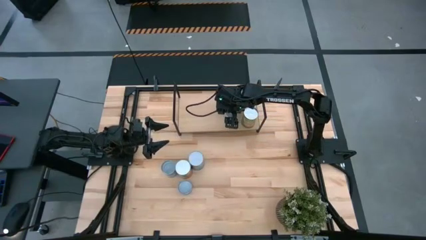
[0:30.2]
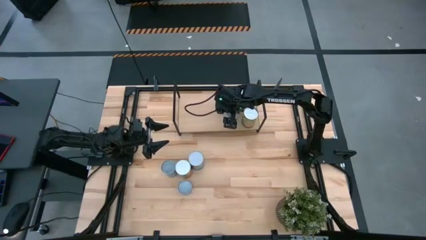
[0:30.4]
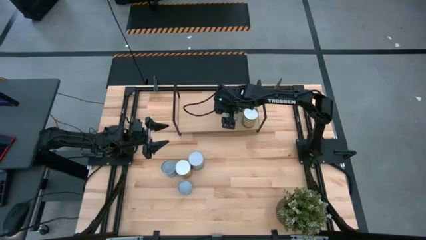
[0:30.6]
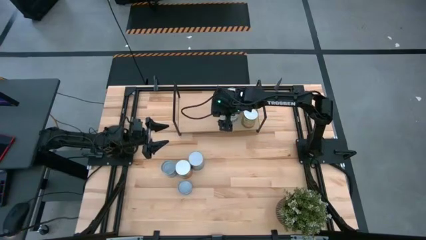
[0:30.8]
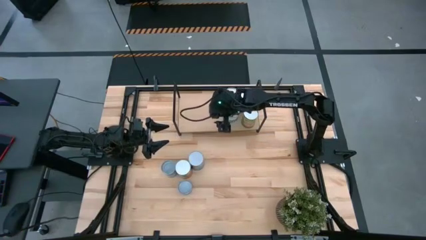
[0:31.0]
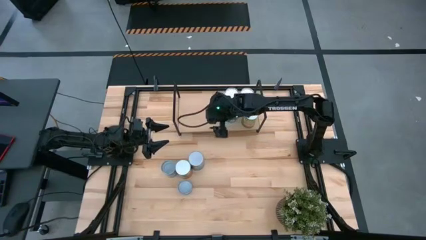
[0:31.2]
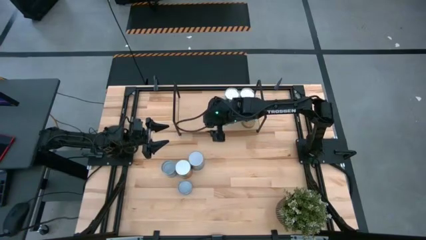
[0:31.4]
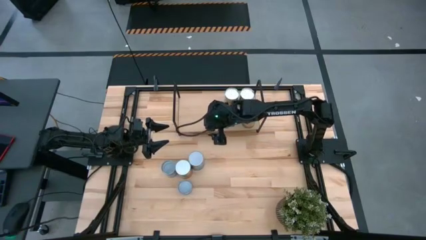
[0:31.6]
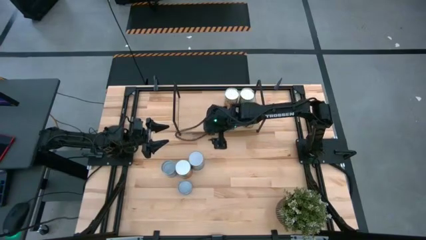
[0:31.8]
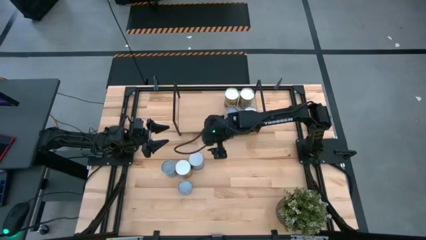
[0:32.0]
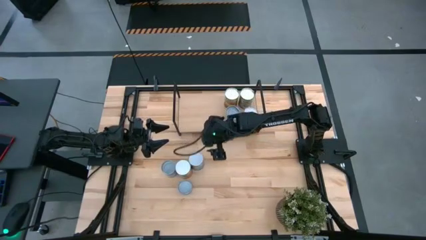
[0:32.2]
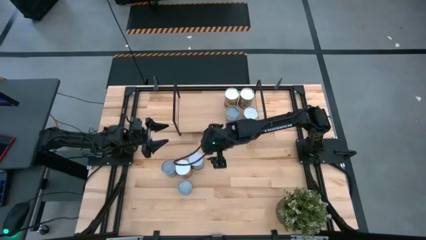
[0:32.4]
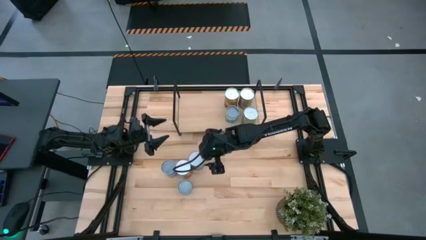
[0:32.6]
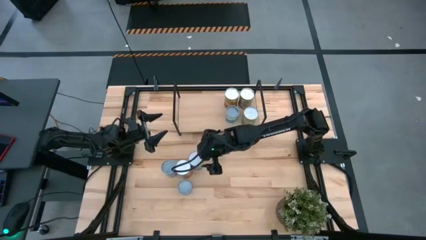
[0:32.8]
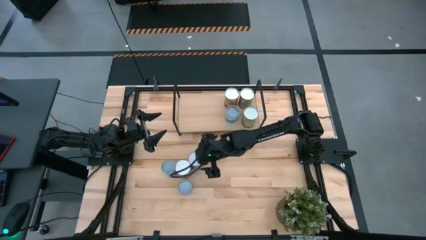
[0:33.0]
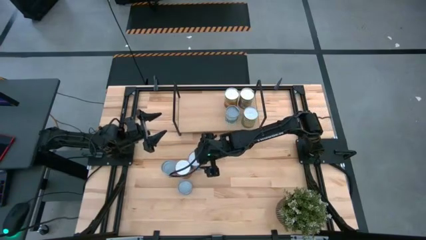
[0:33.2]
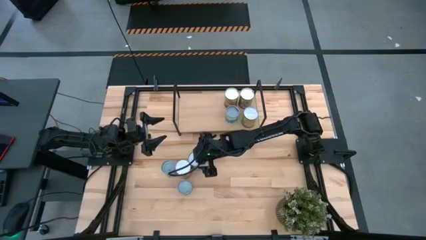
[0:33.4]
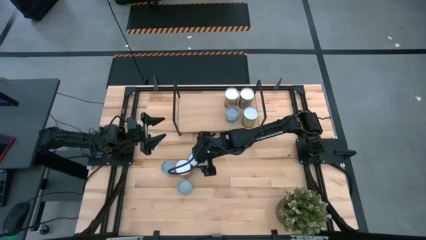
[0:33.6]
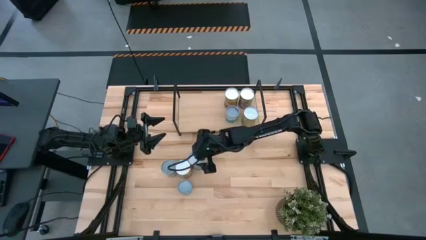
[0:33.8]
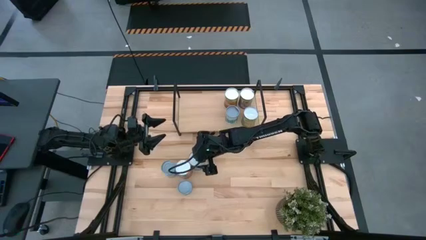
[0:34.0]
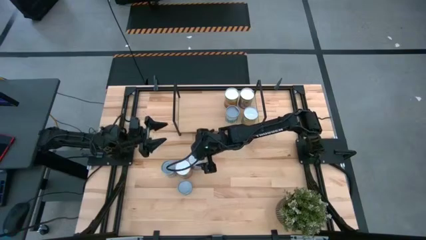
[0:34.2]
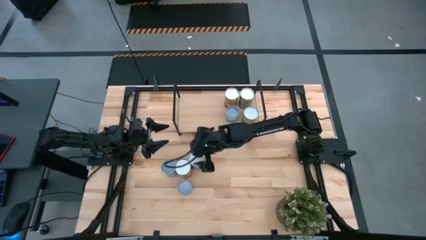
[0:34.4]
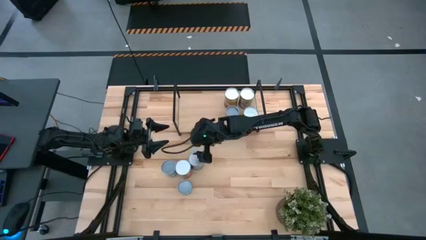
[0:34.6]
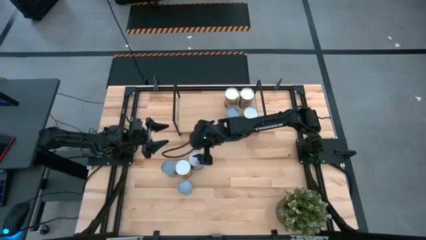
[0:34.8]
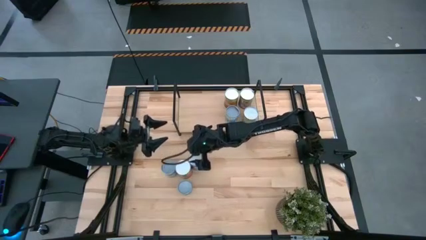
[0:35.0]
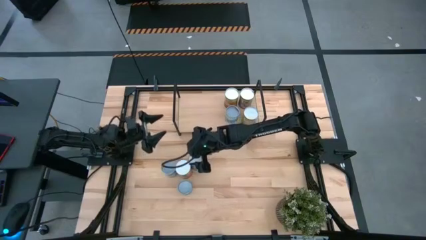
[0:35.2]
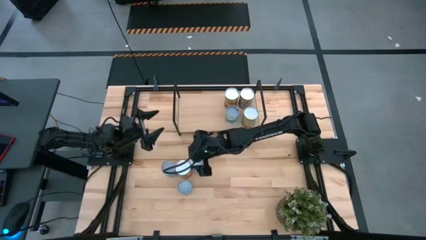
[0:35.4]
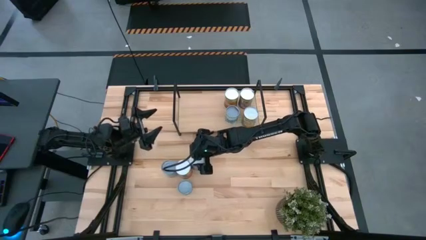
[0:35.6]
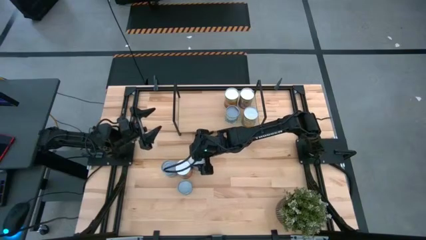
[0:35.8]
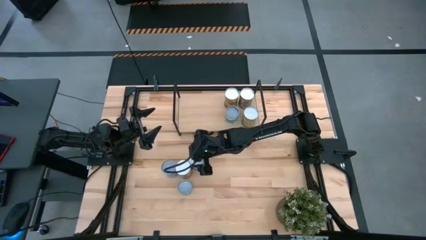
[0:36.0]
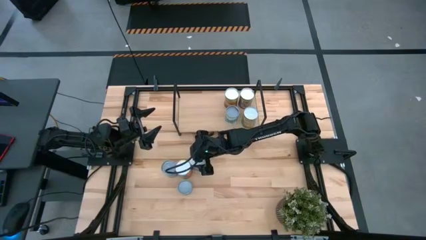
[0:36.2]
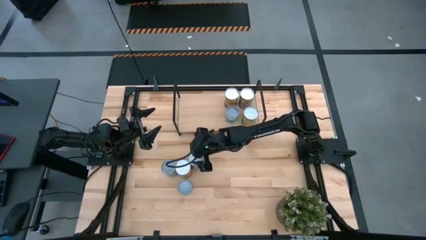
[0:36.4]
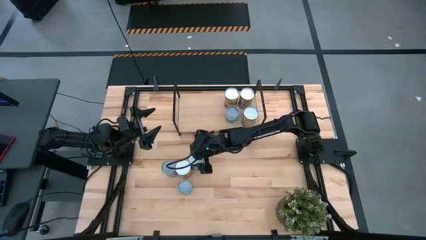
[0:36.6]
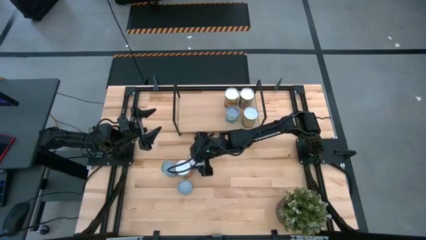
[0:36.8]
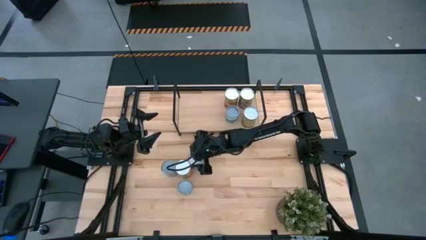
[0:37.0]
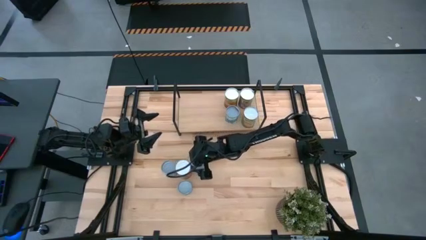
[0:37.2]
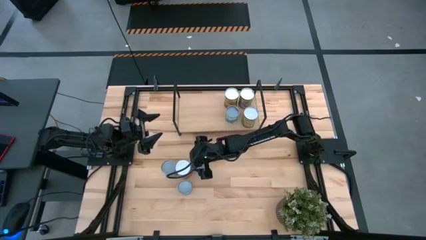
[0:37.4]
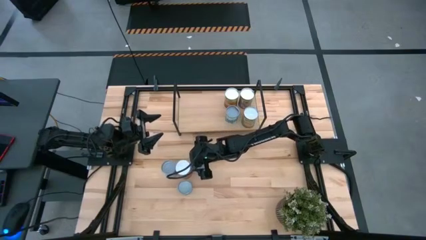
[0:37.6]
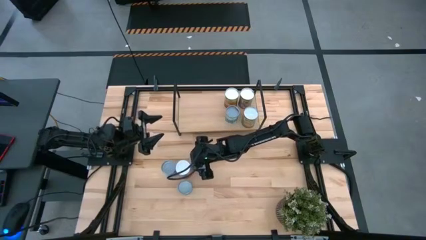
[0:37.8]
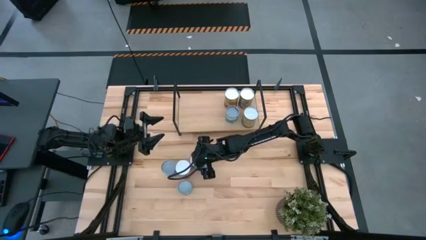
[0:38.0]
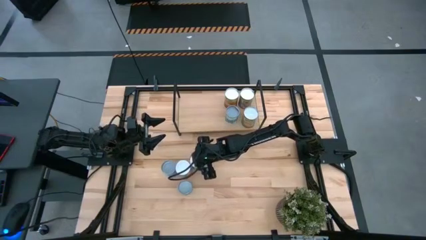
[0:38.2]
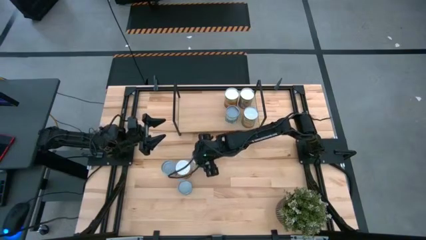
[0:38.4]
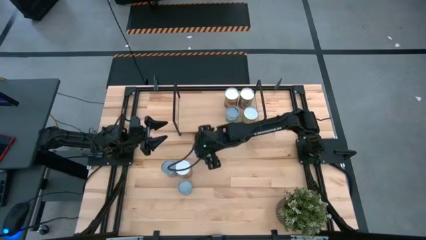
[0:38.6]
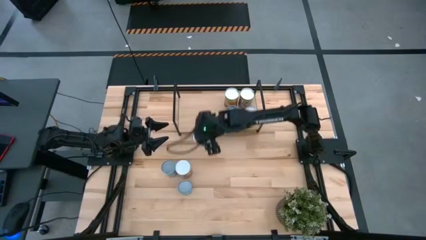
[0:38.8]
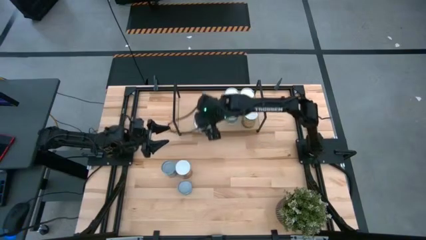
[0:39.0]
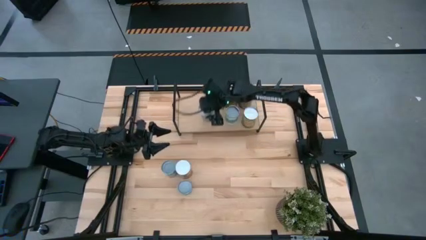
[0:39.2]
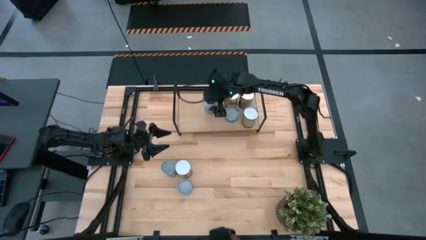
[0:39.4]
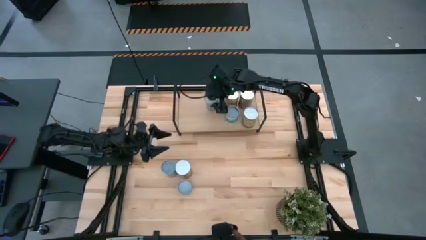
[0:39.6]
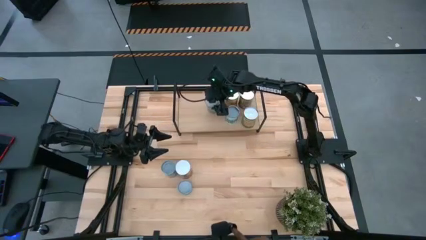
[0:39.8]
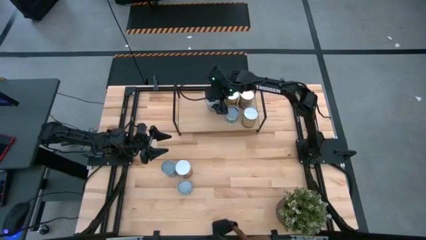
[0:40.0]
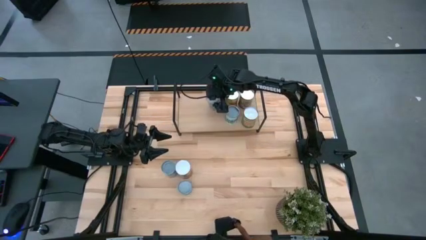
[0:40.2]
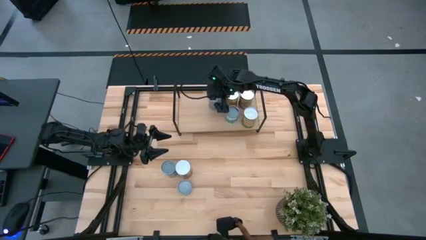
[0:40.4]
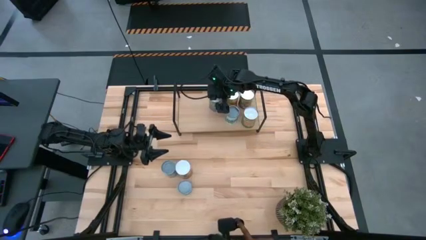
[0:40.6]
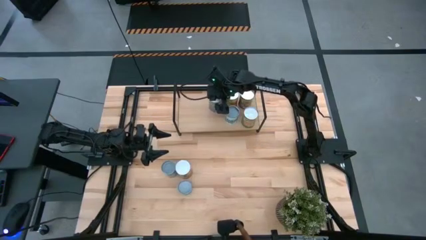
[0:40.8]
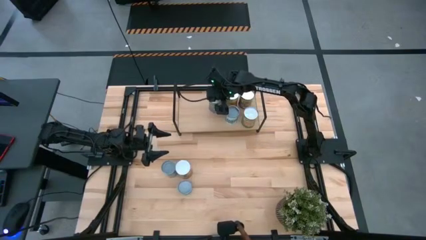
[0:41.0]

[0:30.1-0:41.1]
Task: Pick and place cans onto a shelf
Put the canned cherries on the shelf

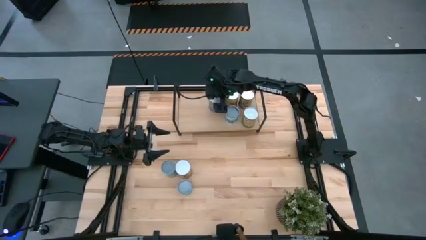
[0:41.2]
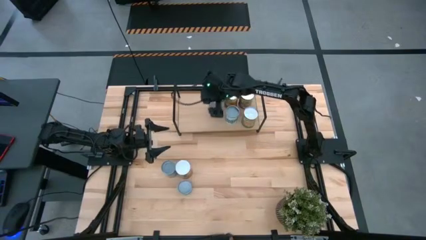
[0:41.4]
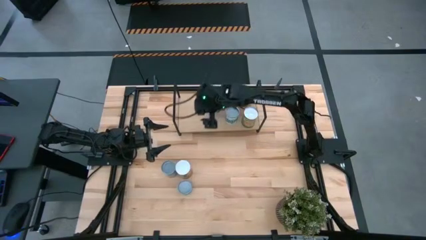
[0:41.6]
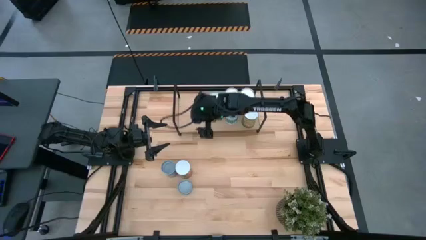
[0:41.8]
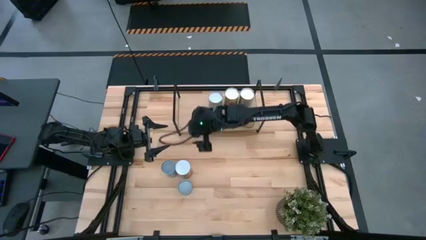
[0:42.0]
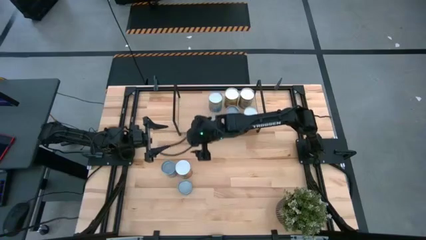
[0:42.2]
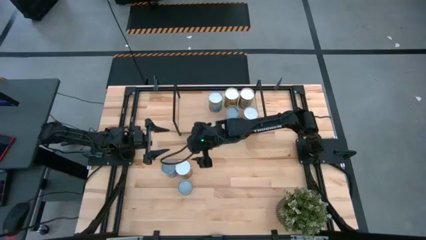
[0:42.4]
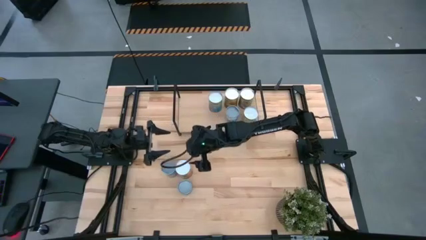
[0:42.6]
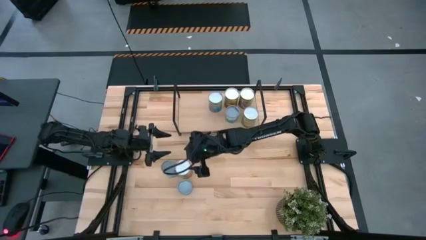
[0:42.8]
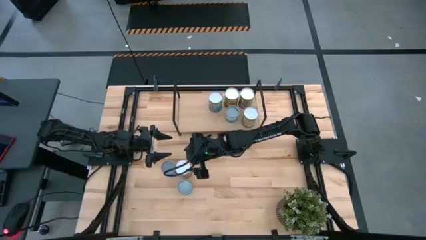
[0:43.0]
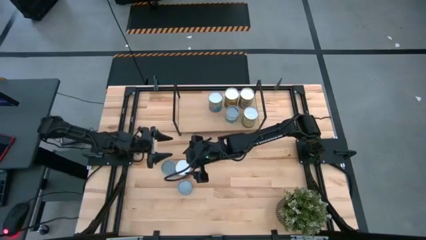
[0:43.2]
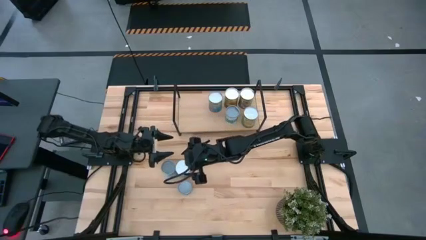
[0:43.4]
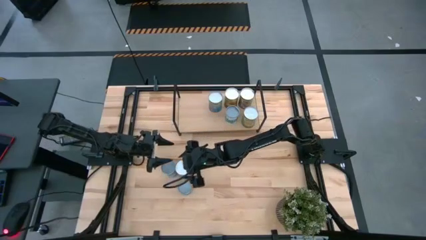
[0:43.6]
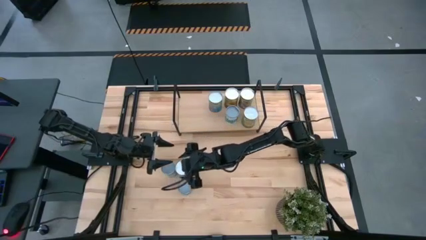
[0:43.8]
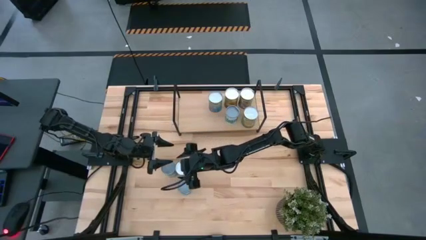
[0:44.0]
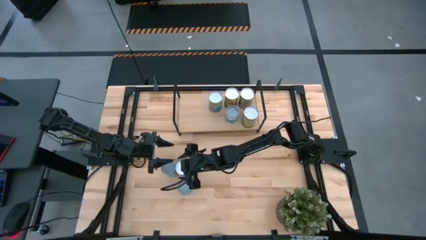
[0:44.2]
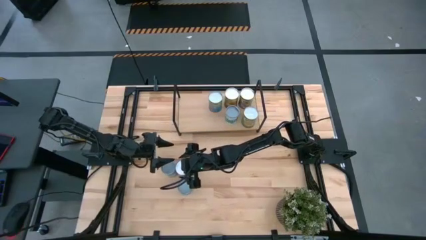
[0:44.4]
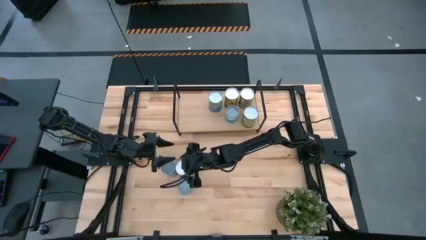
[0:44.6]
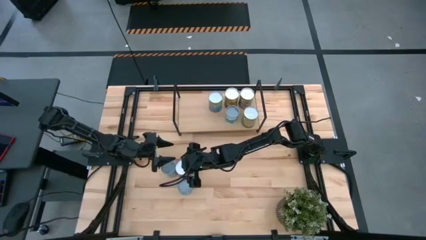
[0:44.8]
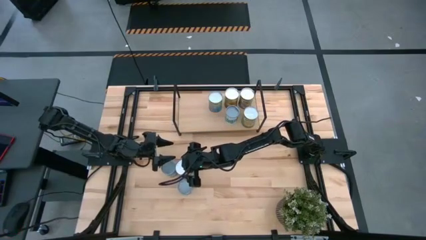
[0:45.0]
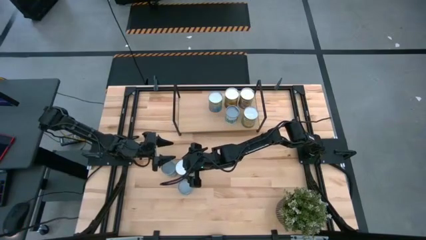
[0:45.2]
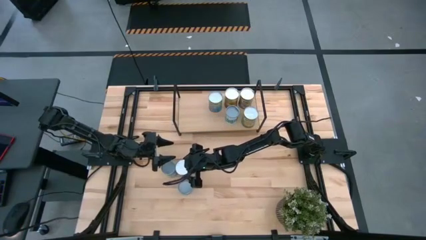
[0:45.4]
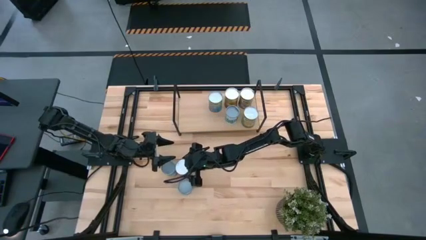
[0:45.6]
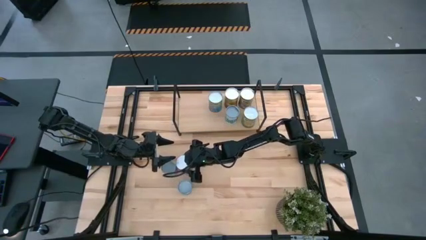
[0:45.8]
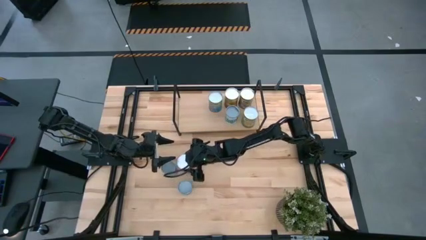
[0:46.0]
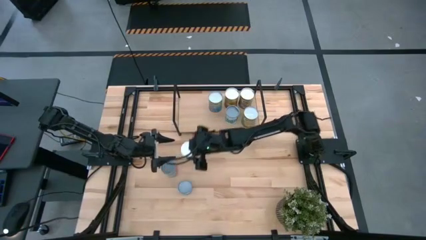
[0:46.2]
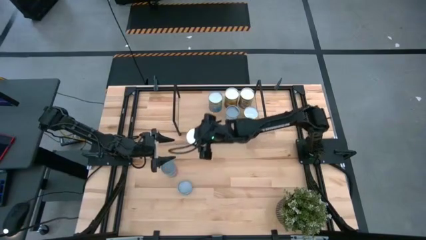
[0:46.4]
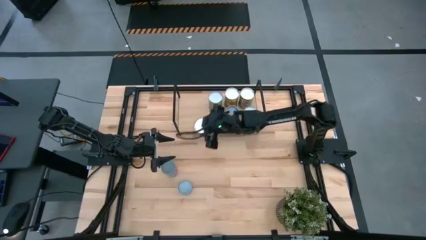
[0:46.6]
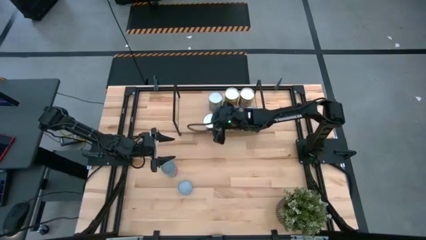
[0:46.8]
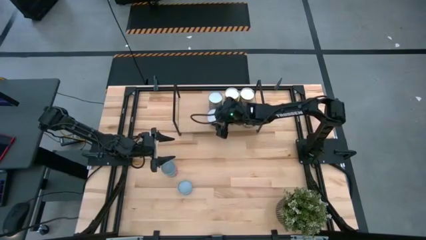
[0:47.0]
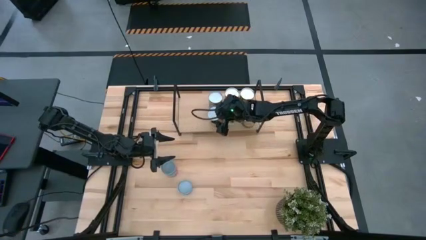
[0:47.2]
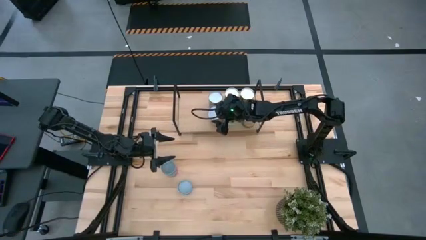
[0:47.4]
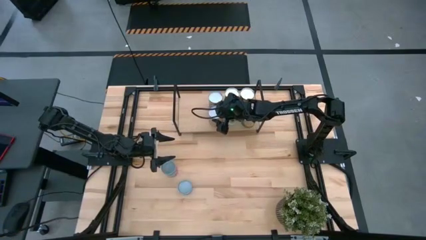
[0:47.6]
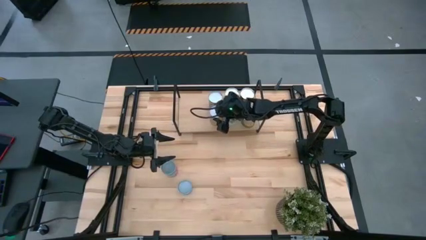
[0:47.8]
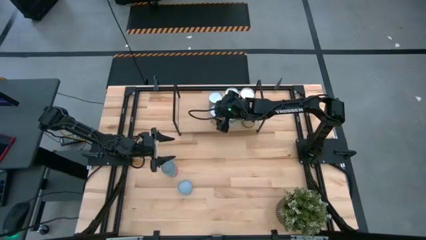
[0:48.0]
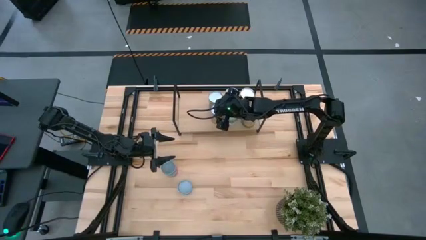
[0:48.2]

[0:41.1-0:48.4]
Put the canned pineapple on the shelf
